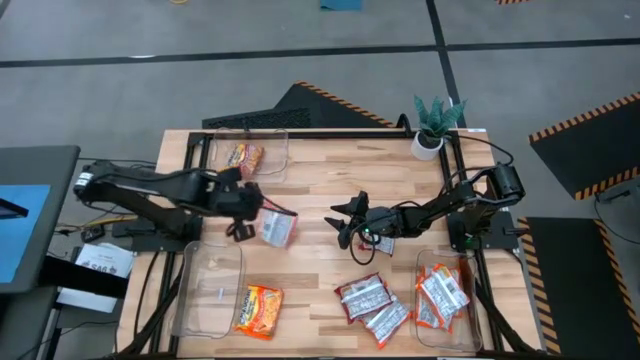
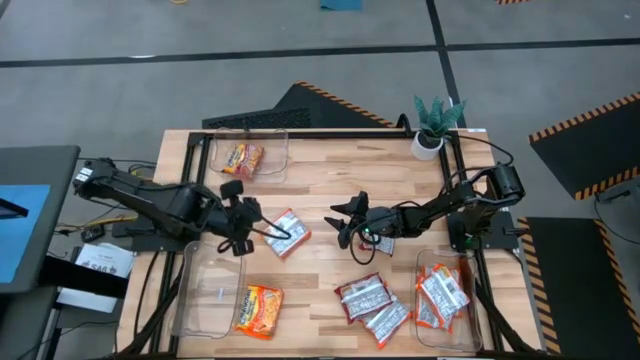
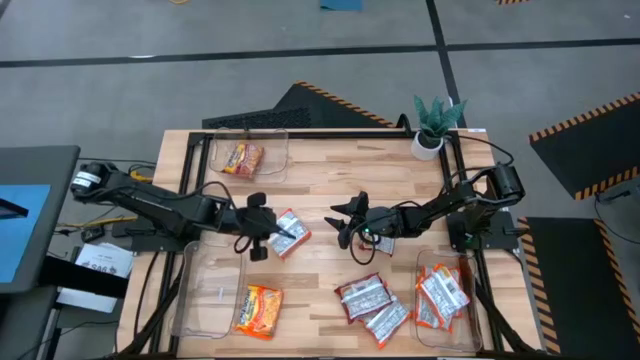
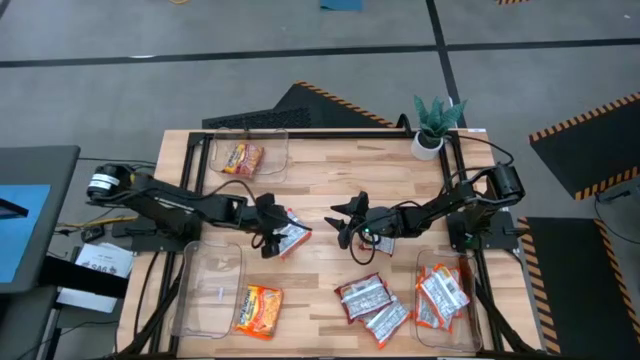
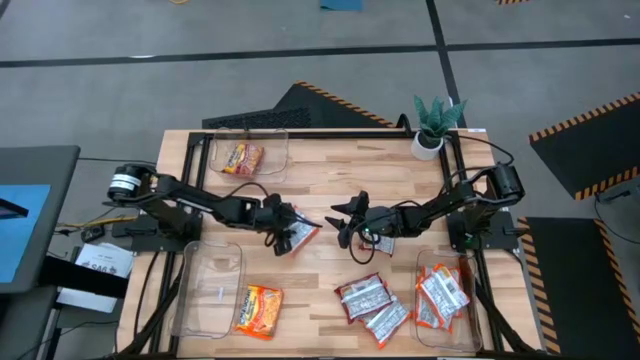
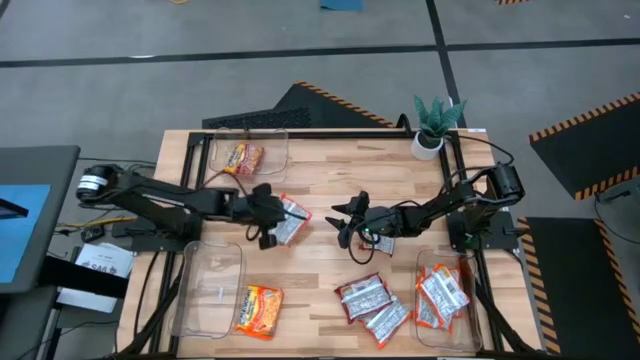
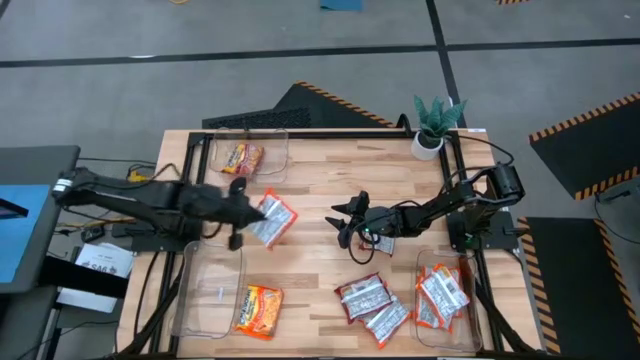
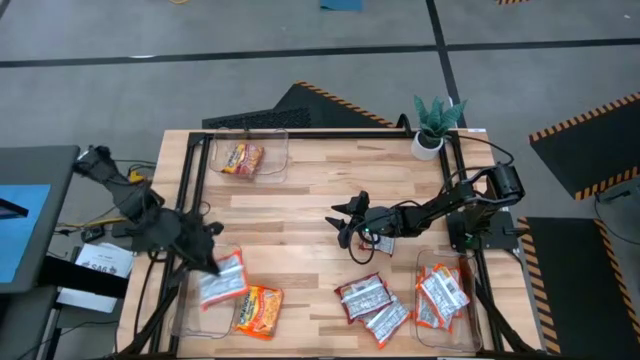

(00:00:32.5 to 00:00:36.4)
Task: Sort Maruchan noodles
Put the orange noodle pack into the bottom left transparent bin

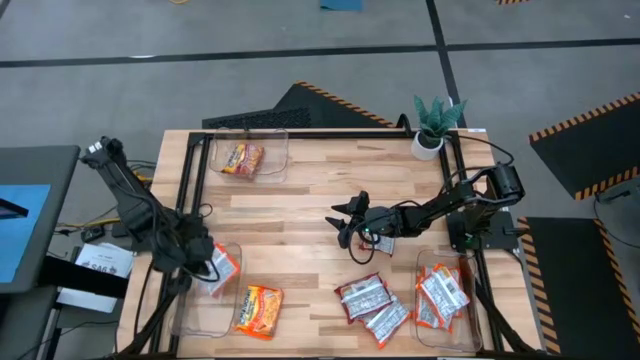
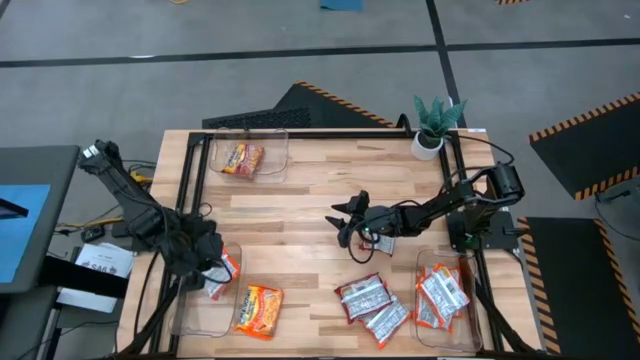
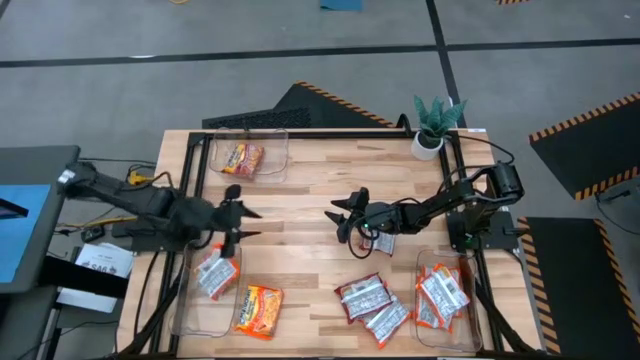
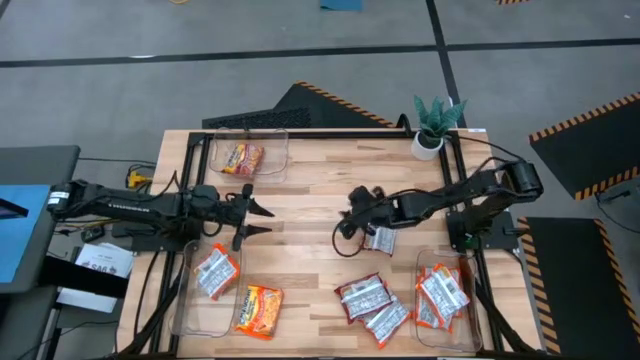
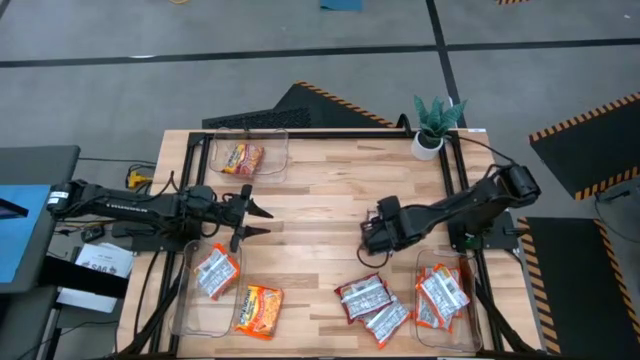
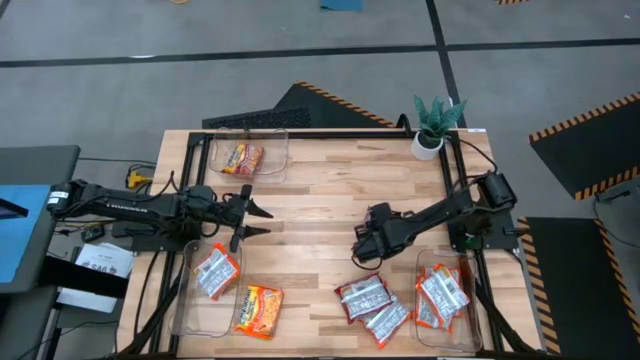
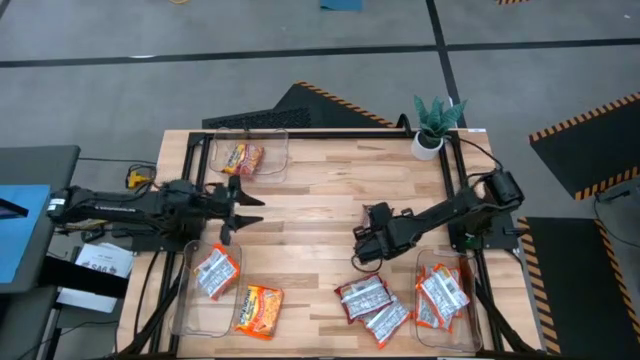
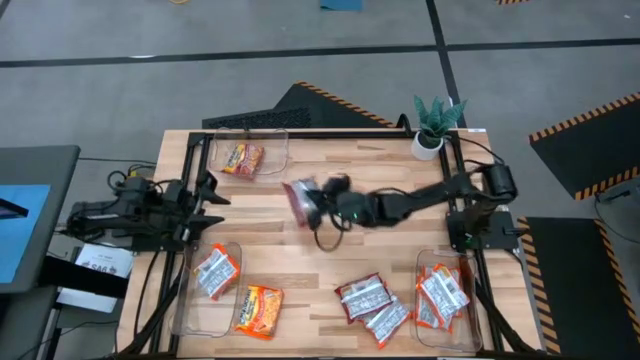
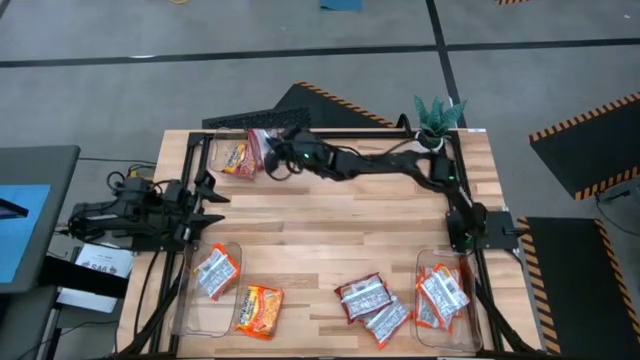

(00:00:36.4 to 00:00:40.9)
Put the red noodle pack into the top left transparent bin

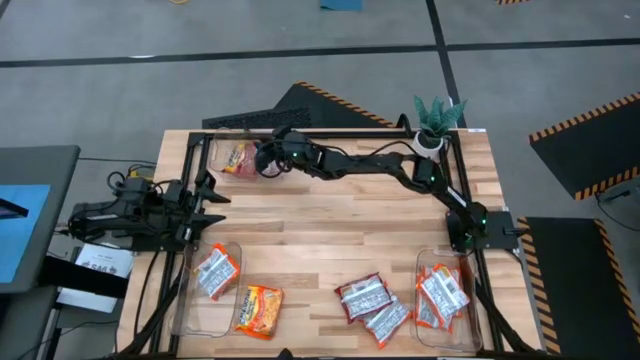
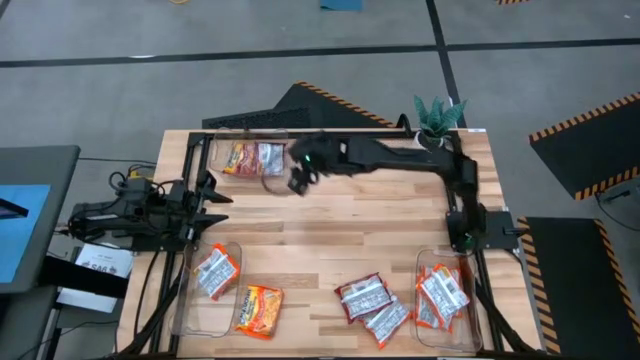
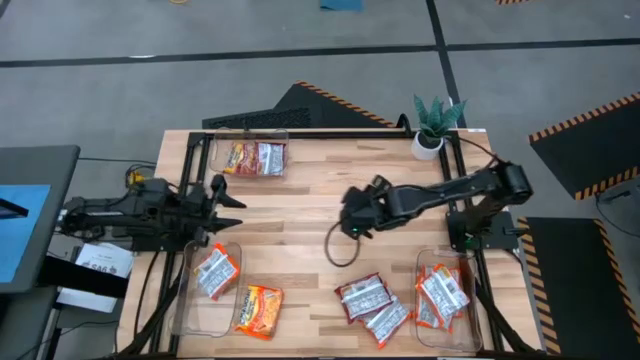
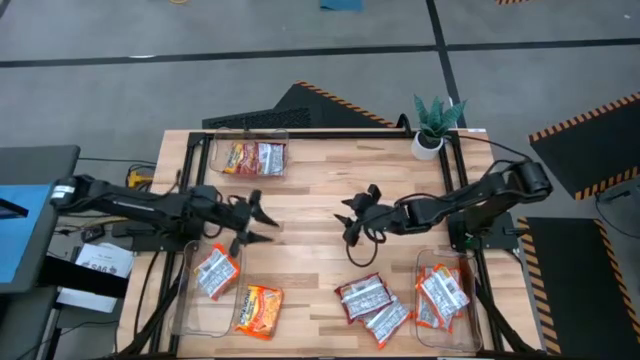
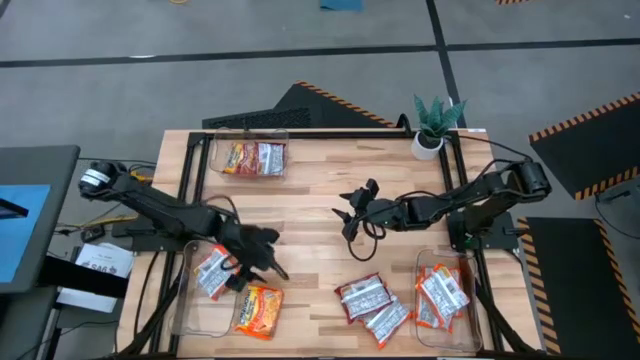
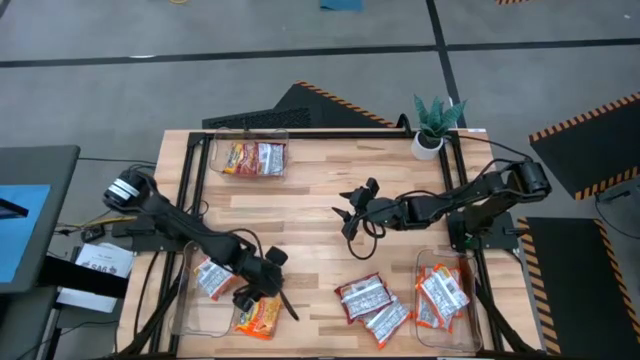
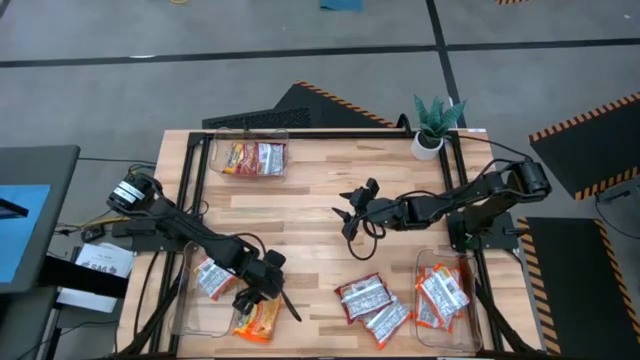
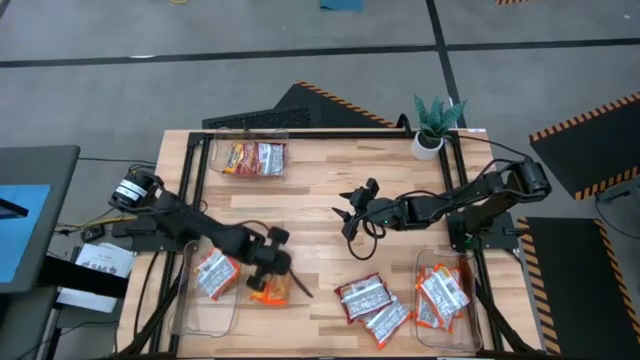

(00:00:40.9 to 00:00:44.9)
Put the orange noodle pack into the bottom left transparent bin

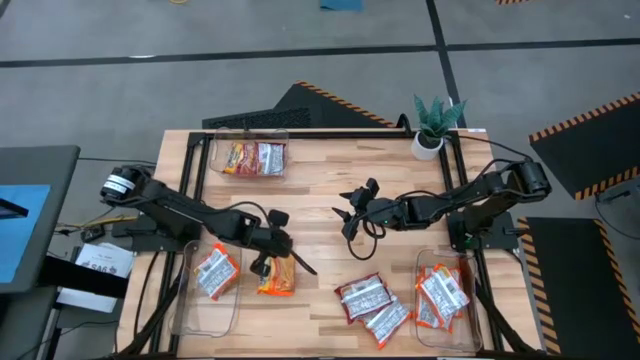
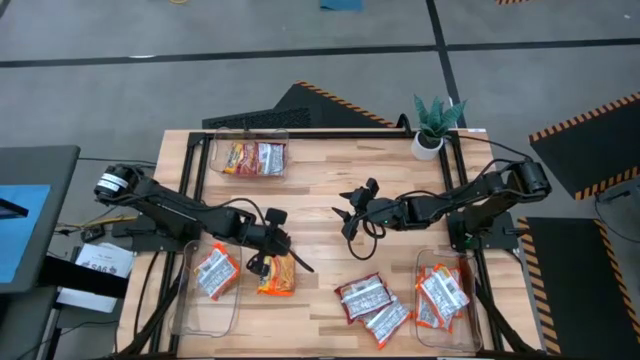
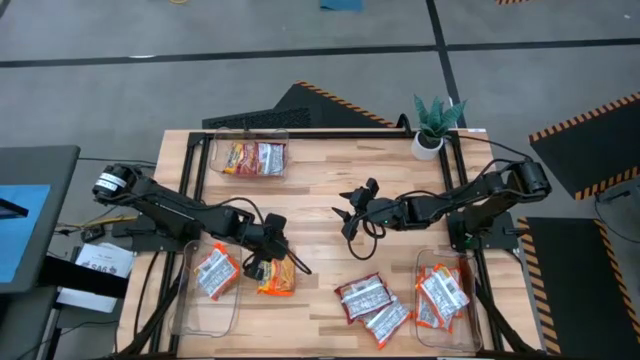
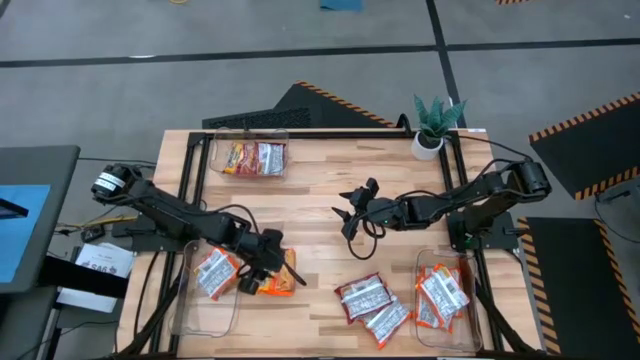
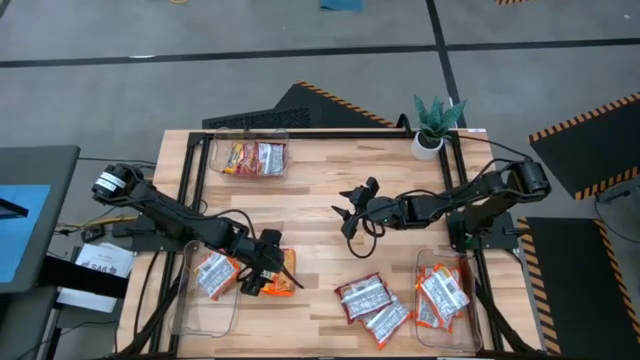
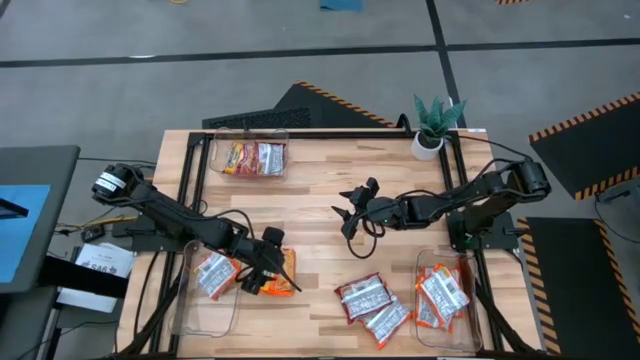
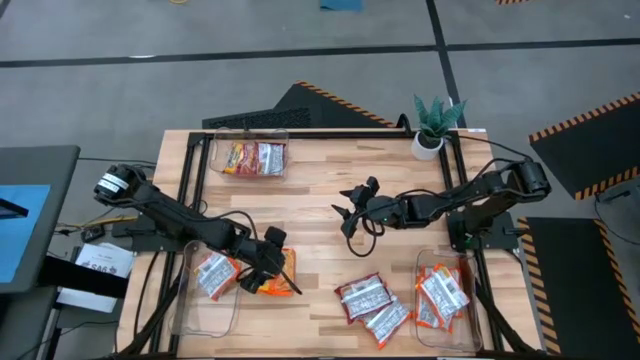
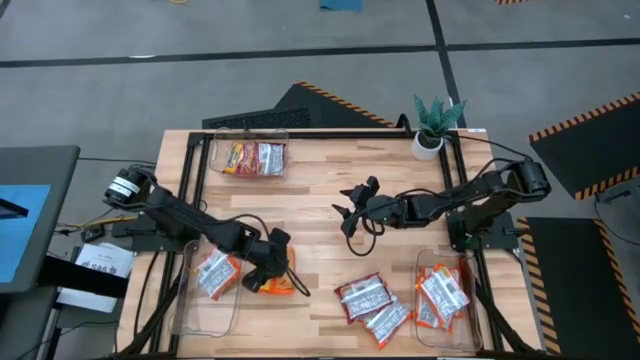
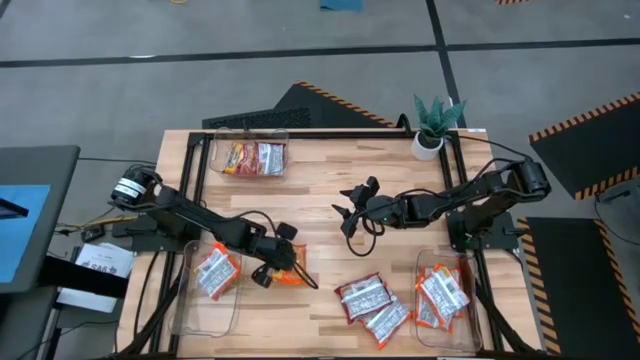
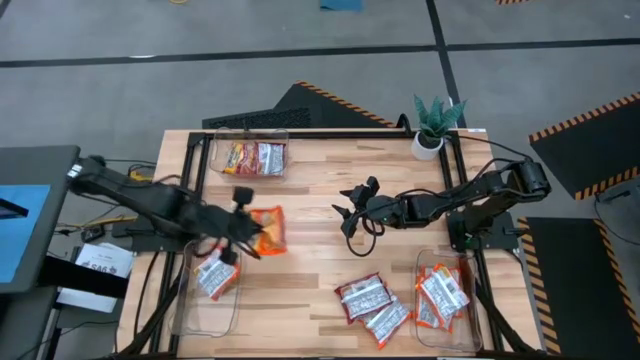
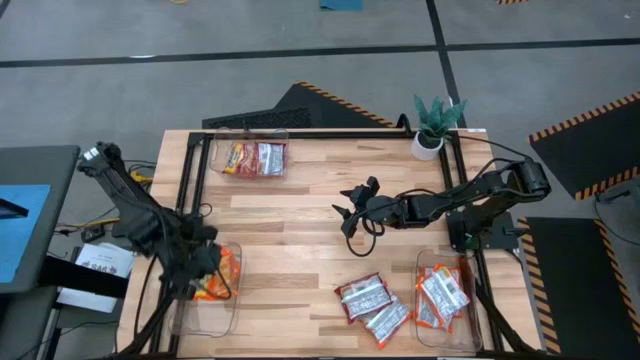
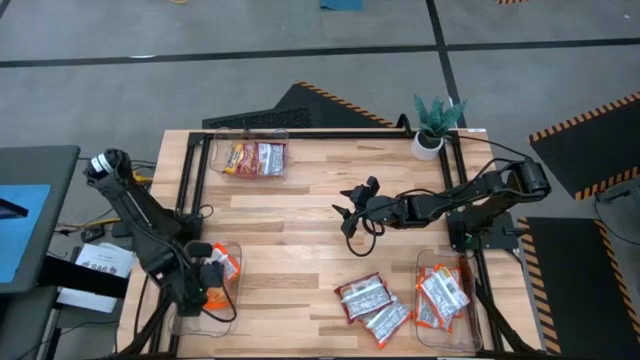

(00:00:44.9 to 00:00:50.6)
Put the orange noodle pack into the bottom left transparent bin

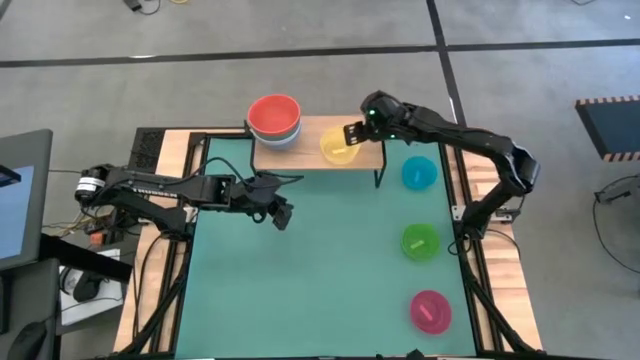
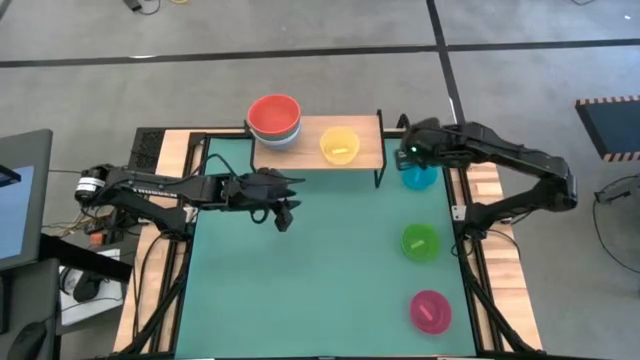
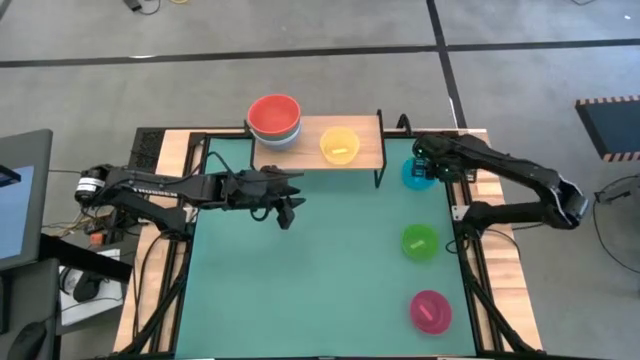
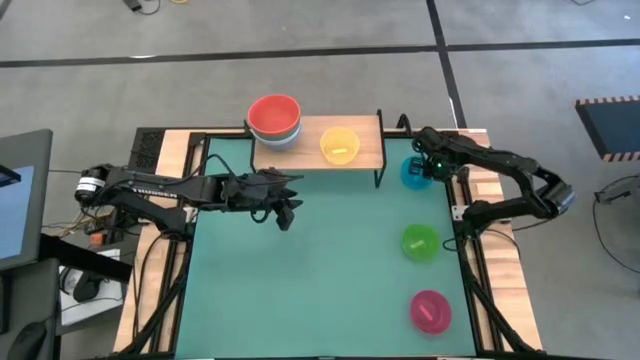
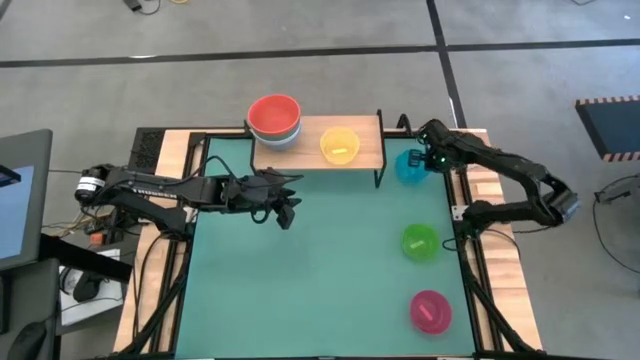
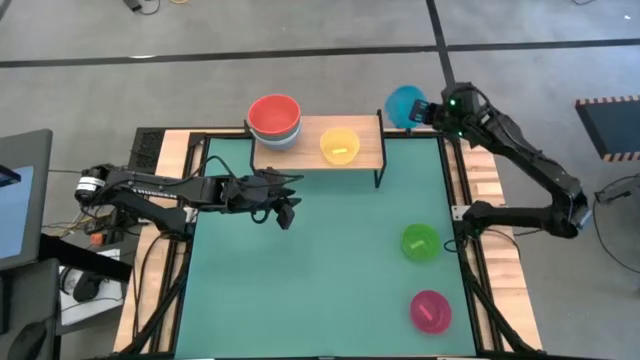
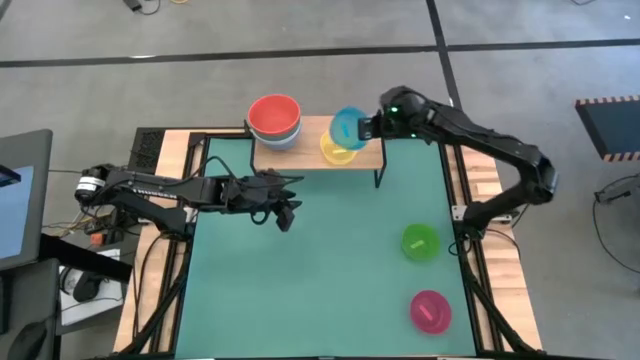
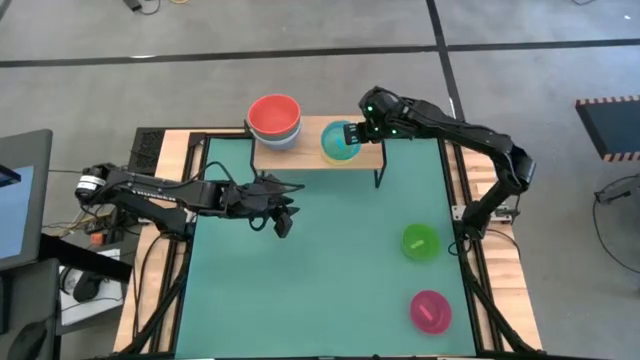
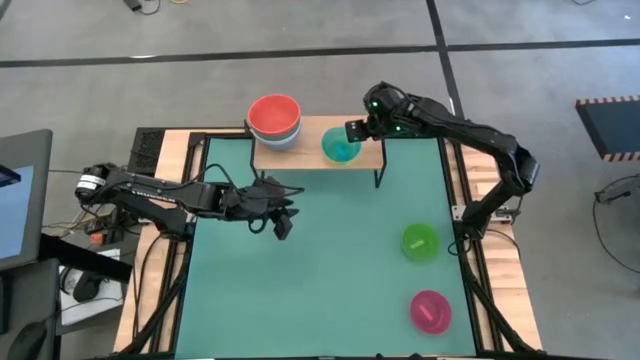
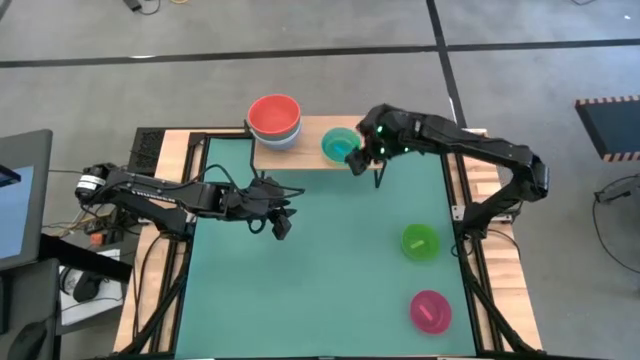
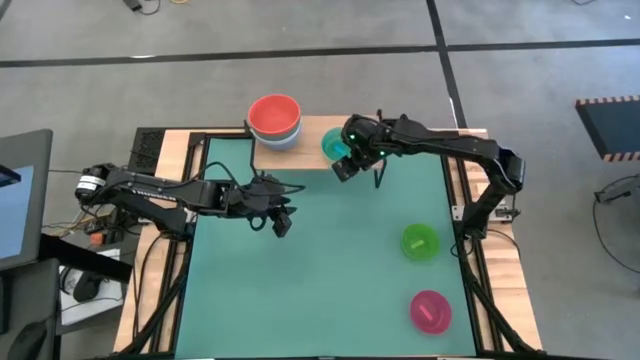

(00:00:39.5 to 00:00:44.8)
Task: Place and stack bowls onto a shelf
Stack the light blue bowl on top of the light yellow bowl on the shelf
